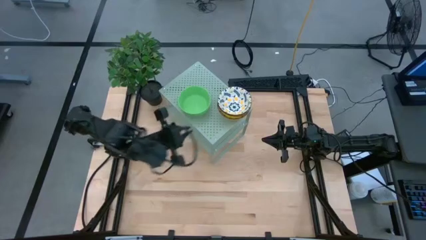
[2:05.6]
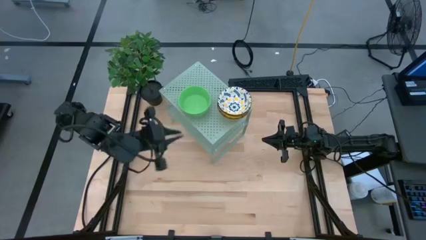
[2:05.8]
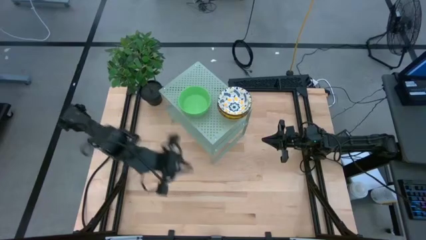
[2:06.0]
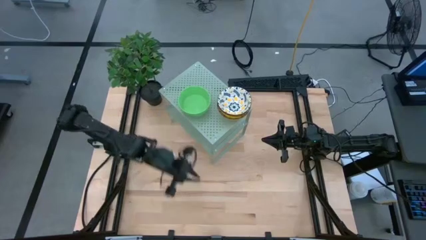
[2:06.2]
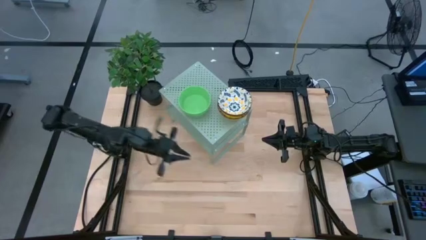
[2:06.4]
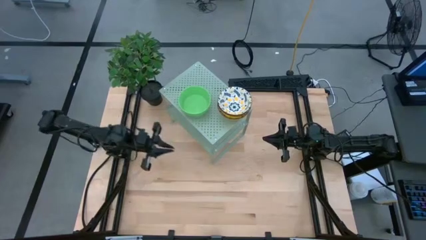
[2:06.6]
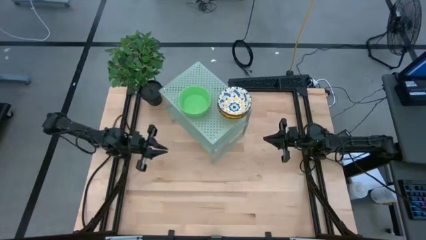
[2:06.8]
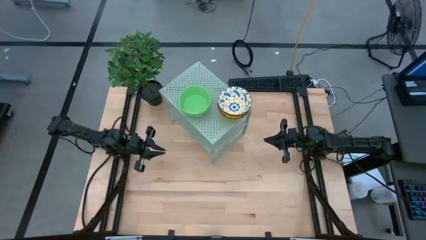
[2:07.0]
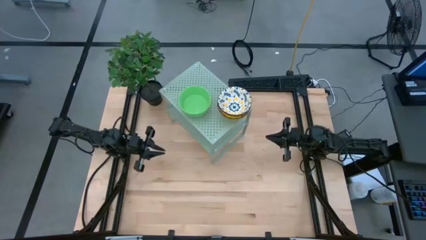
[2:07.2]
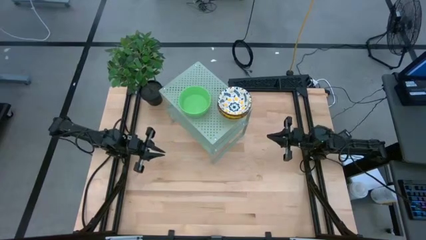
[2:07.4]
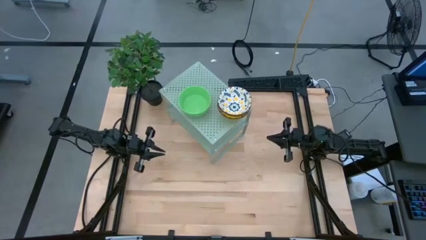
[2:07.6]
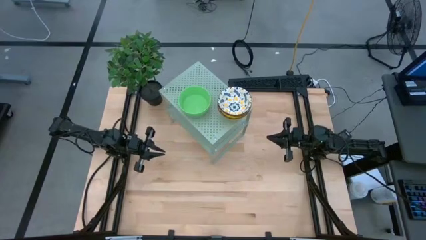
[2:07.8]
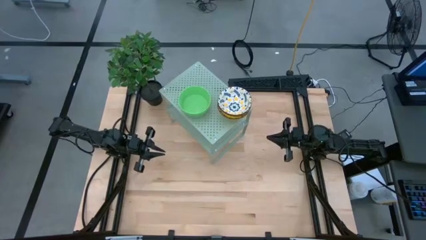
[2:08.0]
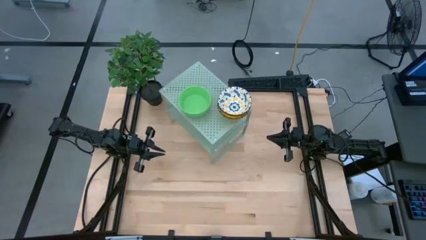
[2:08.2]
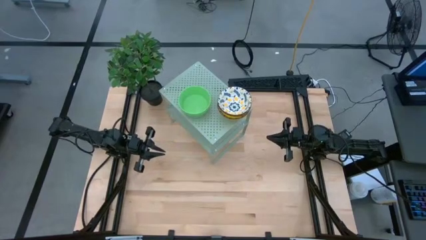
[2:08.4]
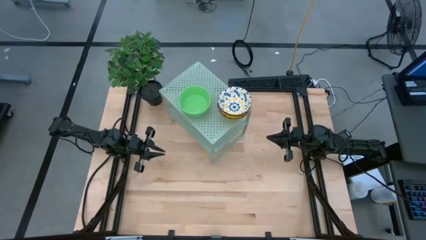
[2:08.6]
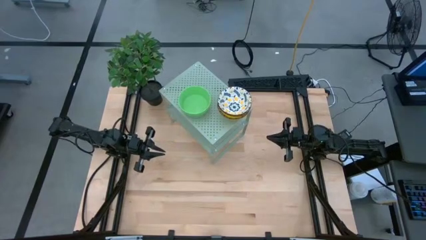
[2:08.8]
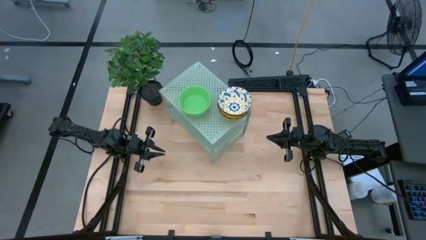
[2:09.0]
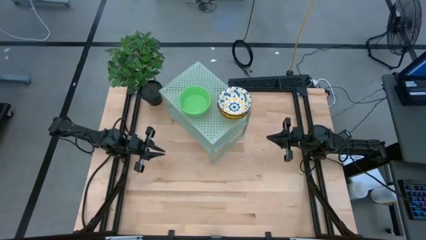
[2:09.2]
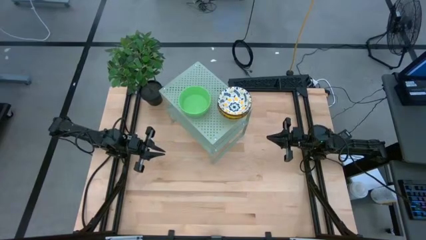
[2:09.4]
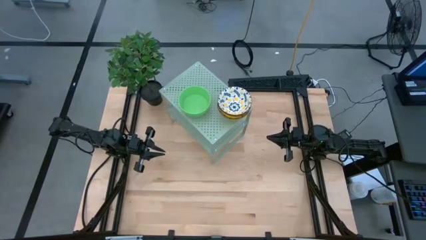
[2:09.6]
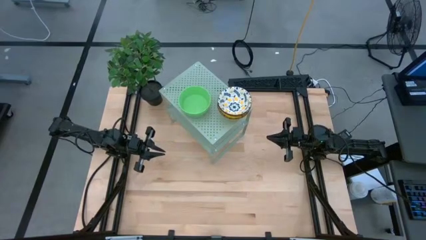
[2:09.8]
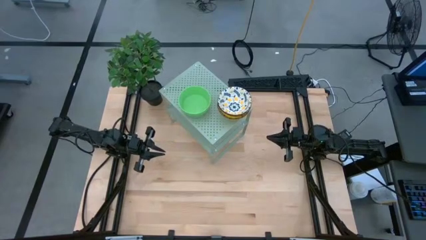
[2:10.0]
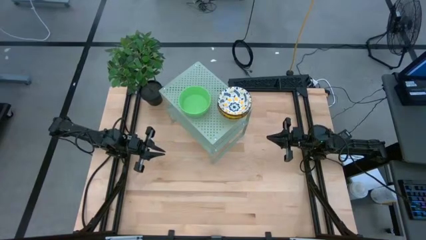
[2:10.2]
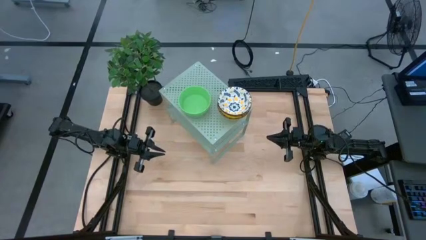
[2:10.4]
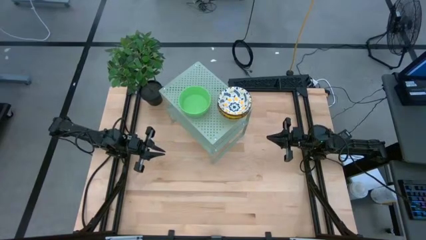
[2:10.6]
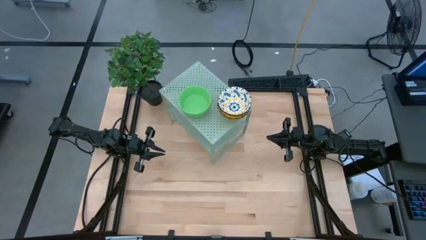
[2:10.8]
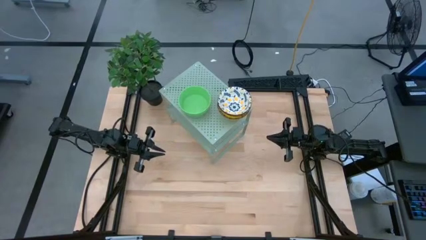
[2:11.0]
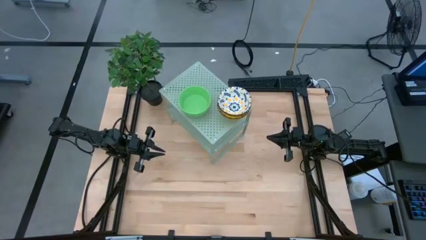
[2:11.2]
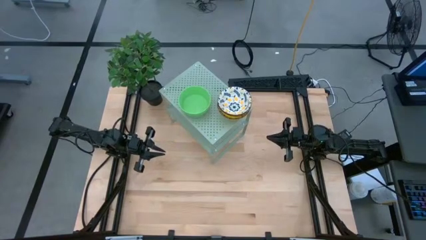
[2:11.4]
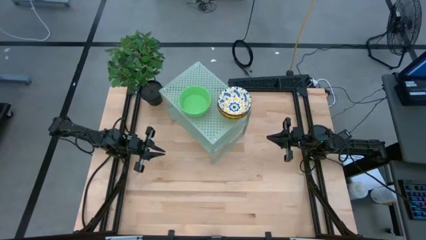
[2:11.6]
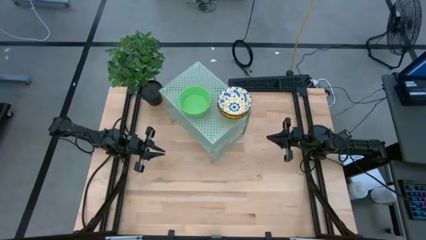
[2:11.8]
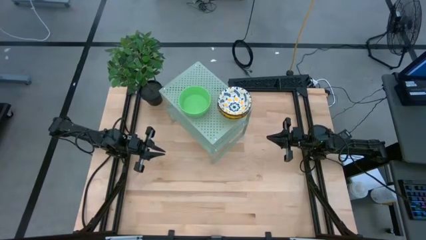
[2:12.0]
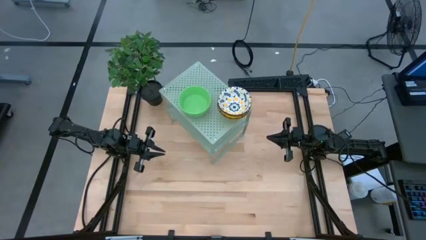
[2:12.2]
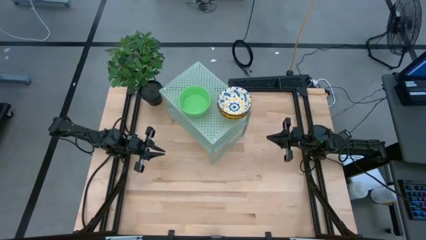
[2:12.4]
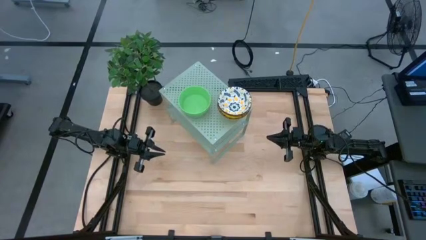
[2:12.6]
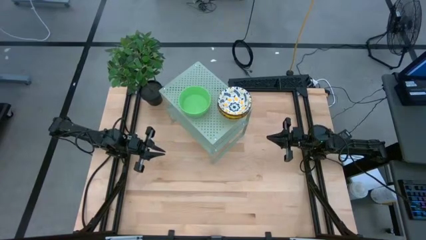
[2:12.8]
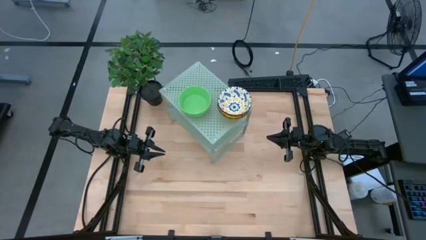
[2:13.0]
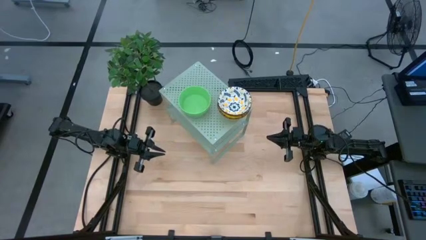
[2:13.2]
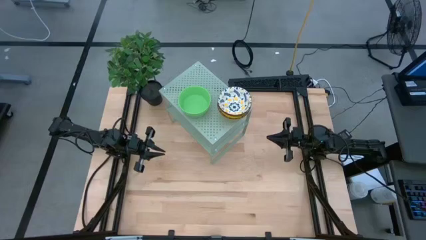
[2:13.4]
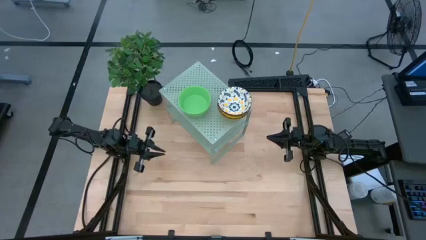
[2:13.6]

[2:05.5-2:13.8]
Task: Pick & Place Mini bowls
Return to Home Position

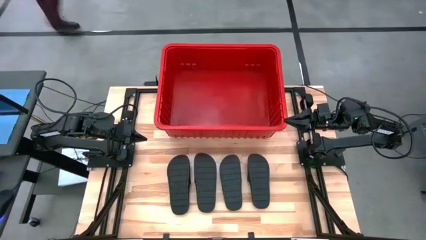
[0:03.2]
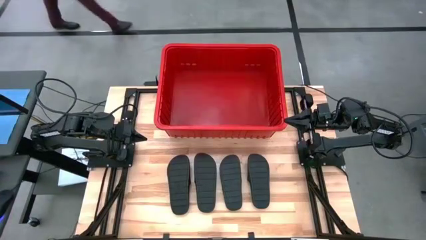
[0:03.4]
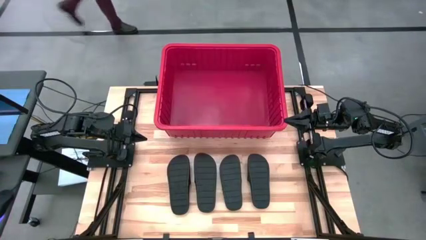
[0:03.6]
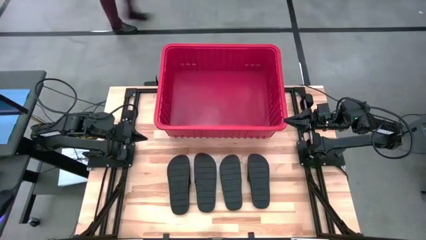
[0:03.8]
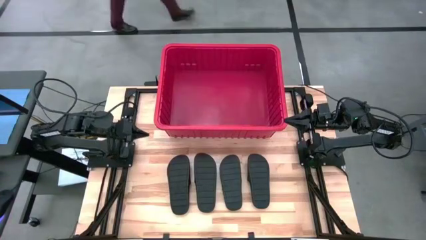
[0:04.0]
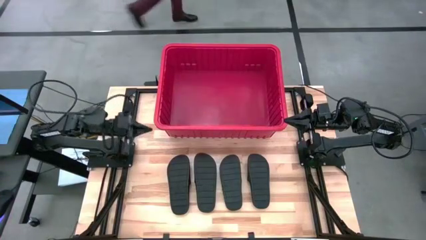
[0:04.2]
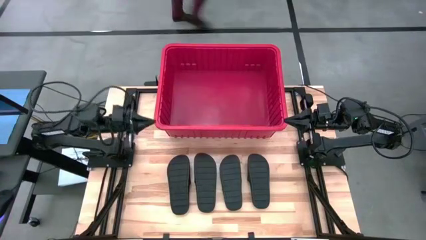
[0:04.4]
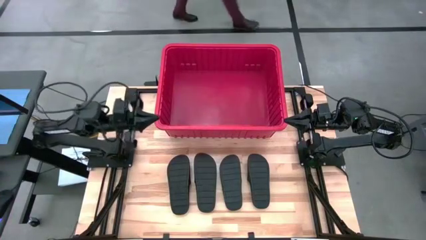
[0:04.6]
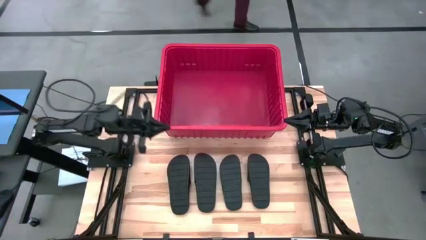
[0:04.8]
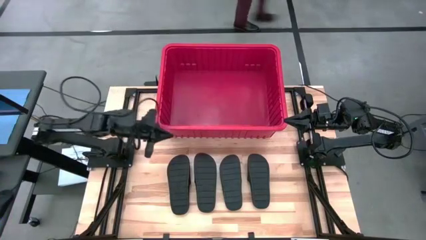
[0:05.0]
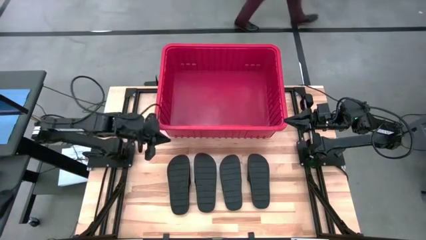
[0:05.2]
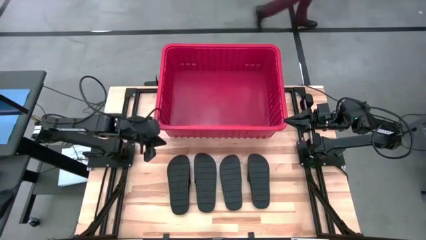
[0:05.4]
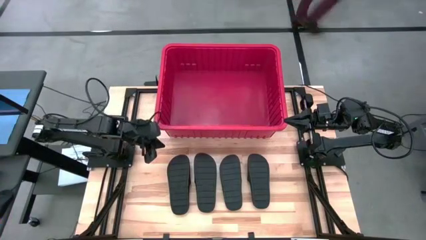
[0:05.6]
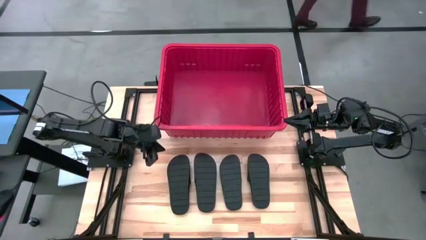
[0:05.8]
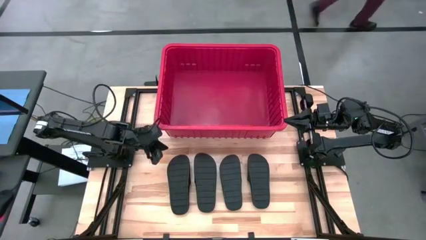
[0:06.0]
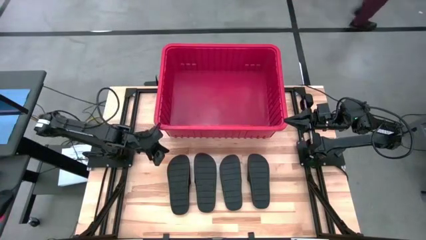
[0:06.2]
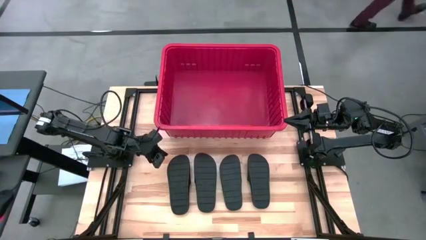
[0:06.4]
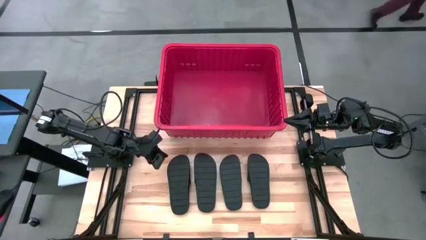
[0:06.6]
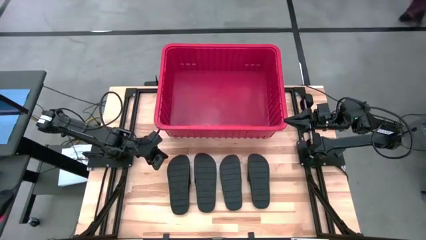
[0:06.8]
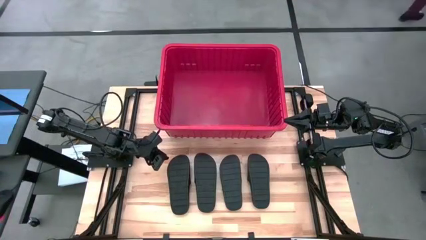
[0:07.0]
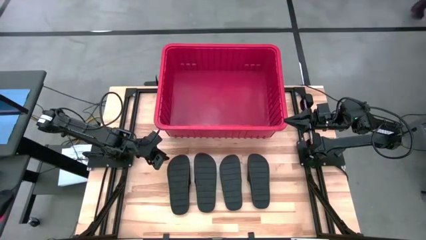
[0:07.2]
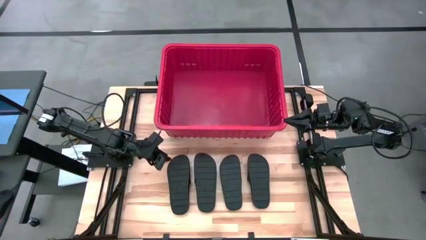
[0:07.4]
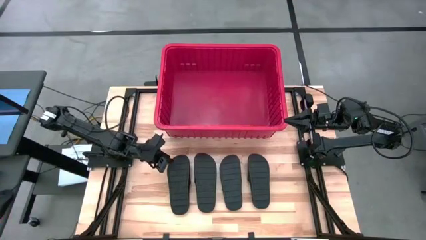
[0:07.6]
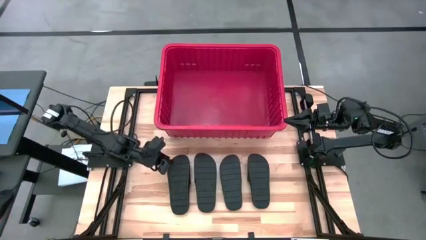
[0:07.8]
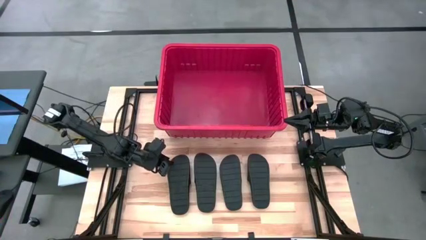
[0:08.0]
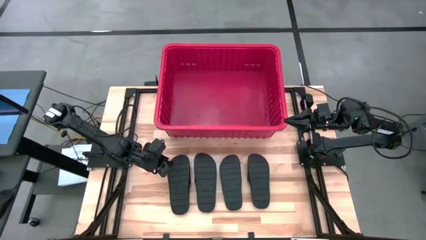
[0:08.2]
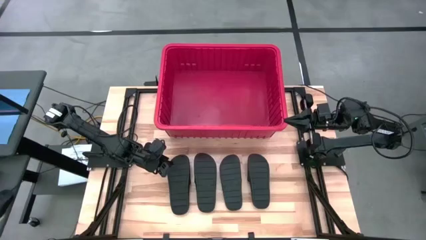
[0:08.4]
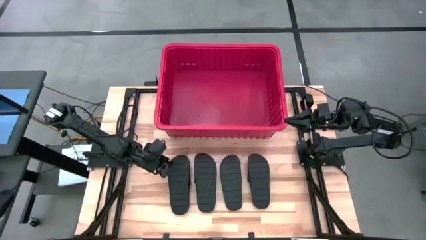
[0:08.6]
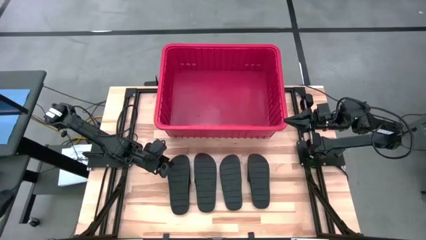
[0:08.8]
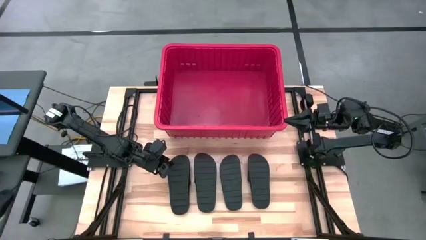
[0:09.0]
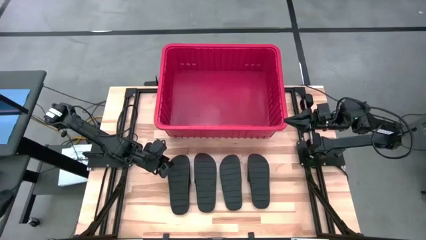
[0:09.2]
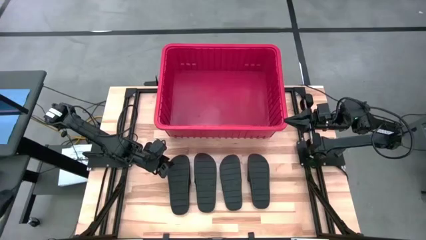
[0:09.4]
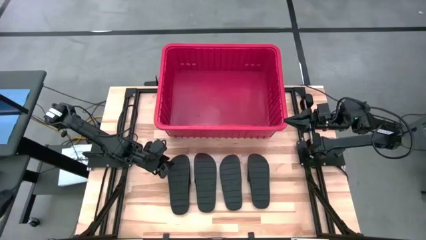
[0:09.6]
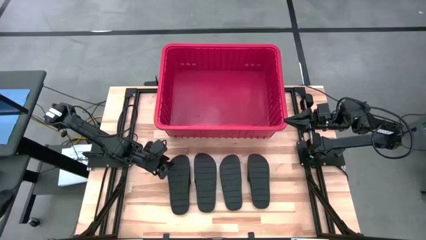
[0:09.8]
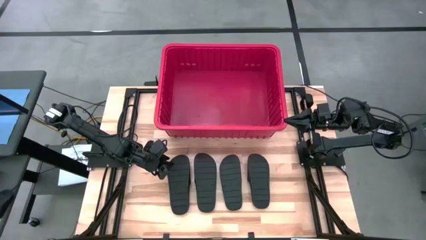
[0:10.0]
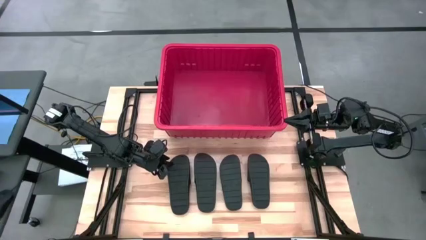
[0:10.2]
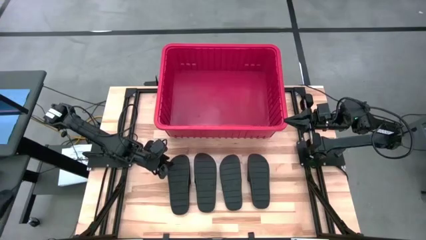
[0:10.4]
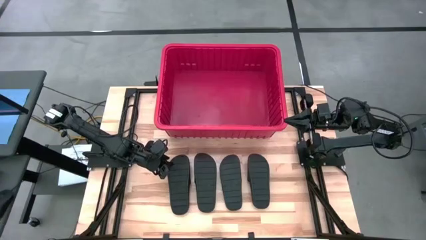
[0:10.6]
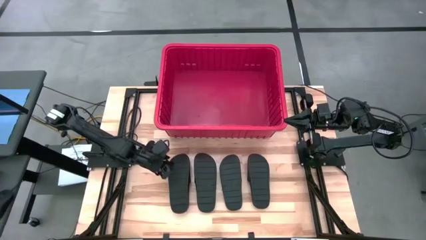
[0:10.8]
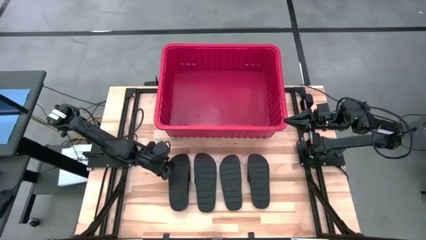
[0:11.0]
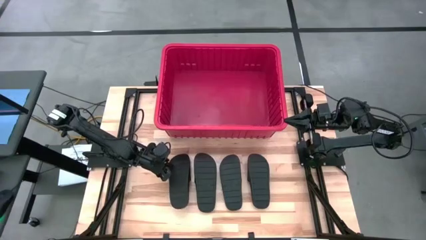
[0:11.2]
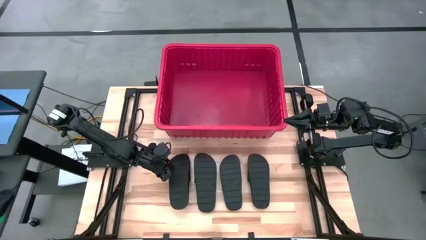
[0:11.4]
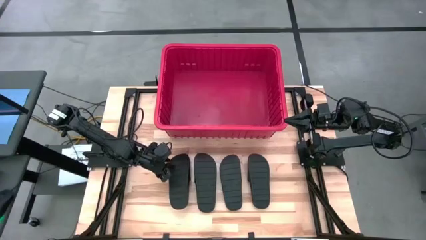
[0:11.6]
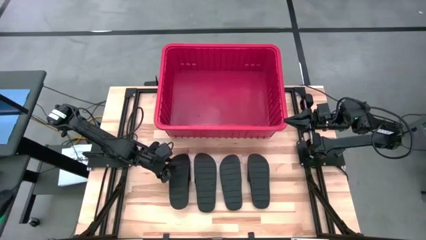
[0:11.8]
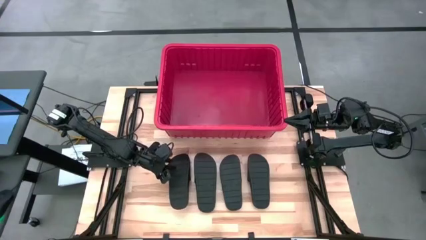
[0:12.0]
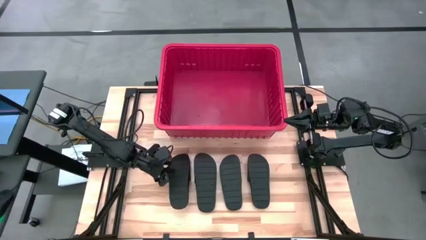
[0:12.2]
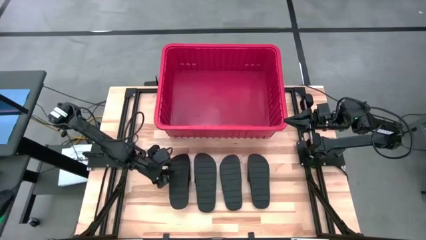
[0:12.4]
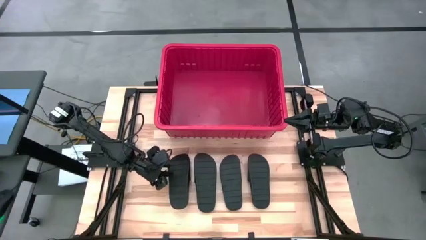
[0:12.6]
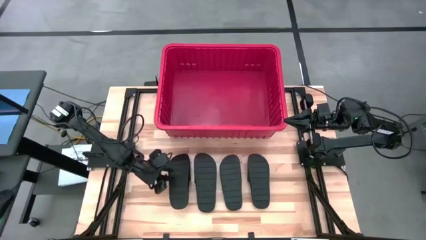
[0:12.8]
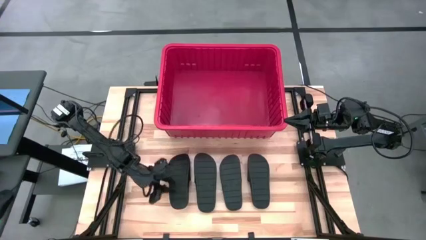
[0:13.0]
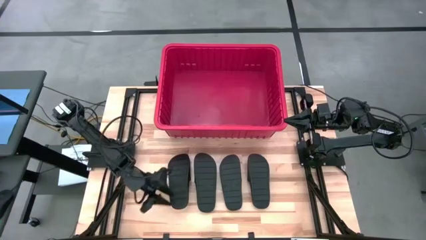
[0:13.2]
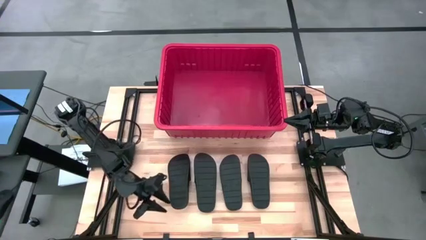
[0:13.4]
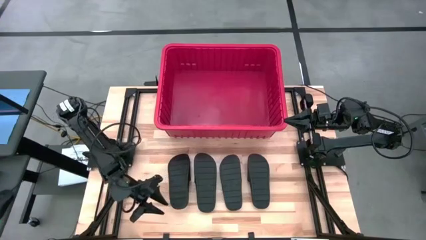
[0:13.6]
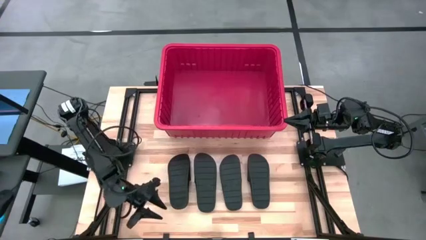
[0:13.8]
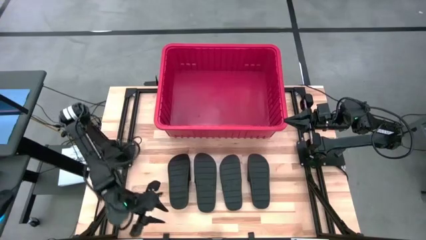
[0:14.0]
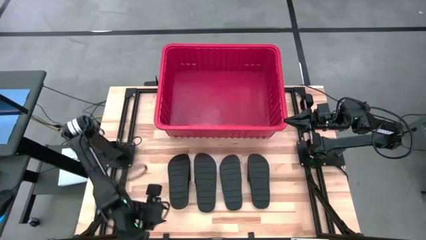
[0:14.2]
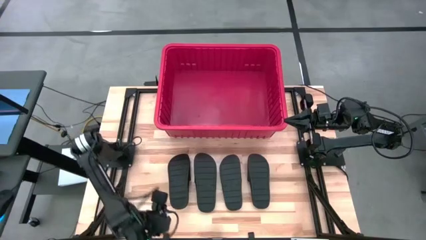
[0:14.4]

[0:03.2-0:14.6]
Task: Pick and place slides into bin
Put the black slide into the red bin
